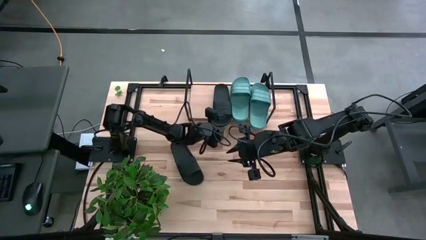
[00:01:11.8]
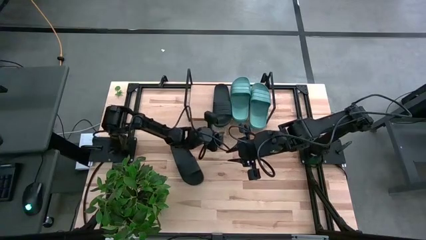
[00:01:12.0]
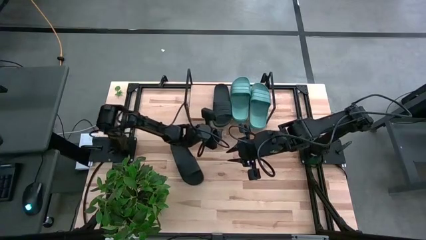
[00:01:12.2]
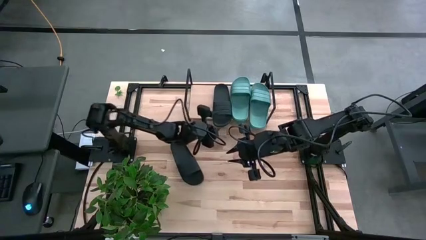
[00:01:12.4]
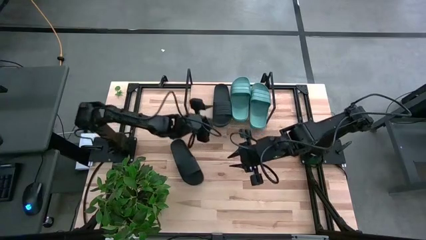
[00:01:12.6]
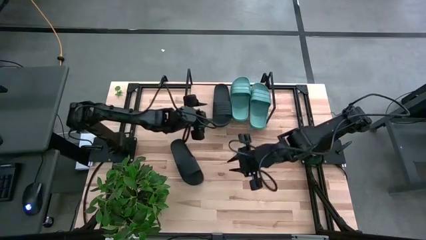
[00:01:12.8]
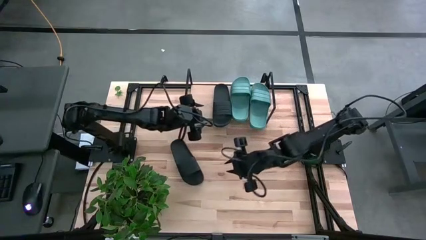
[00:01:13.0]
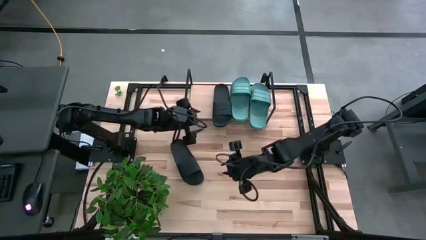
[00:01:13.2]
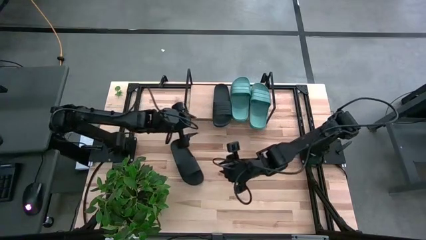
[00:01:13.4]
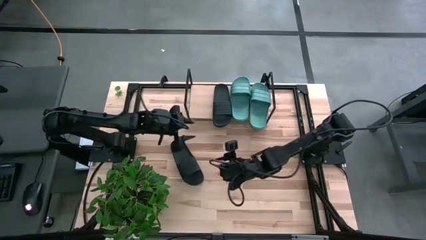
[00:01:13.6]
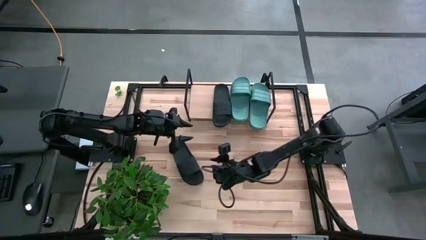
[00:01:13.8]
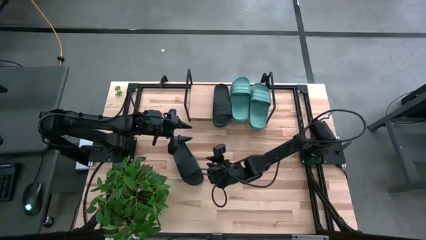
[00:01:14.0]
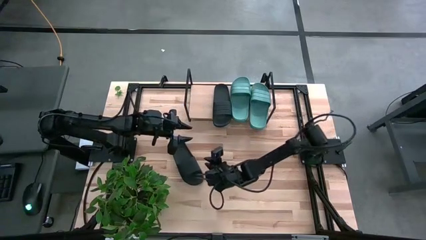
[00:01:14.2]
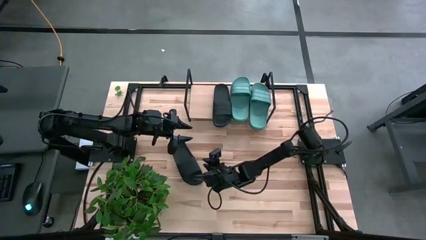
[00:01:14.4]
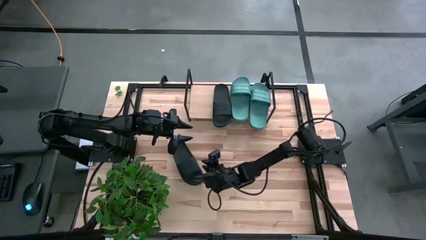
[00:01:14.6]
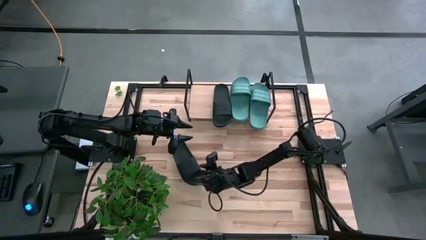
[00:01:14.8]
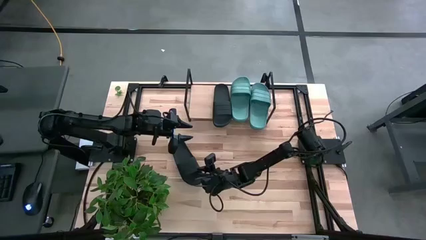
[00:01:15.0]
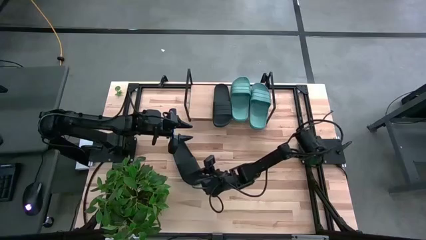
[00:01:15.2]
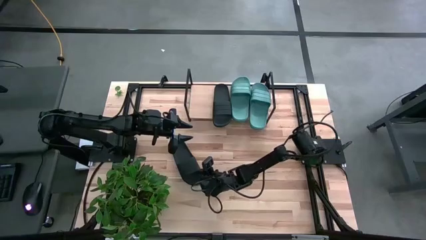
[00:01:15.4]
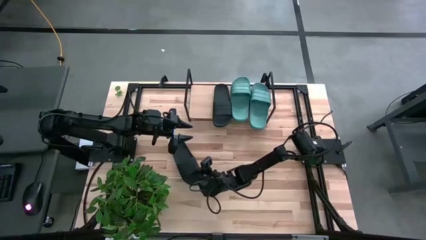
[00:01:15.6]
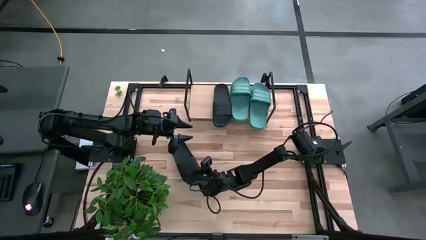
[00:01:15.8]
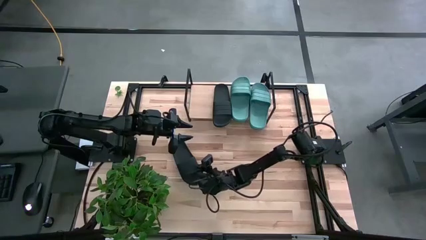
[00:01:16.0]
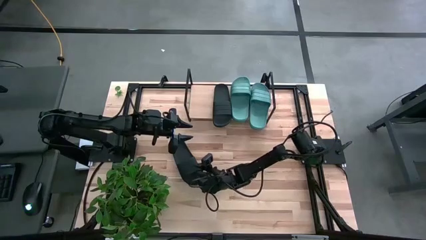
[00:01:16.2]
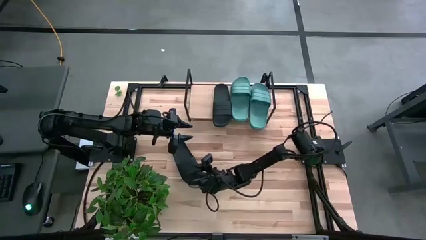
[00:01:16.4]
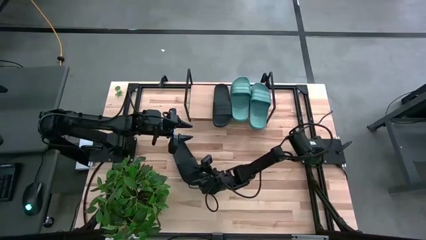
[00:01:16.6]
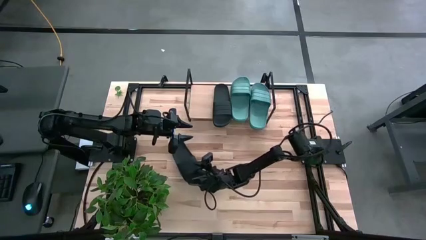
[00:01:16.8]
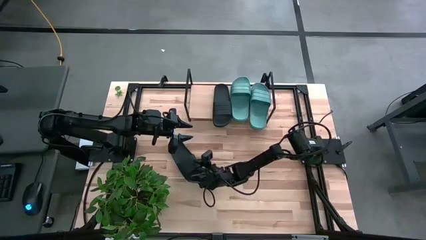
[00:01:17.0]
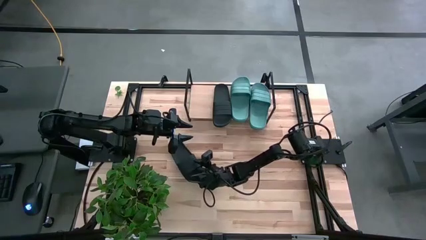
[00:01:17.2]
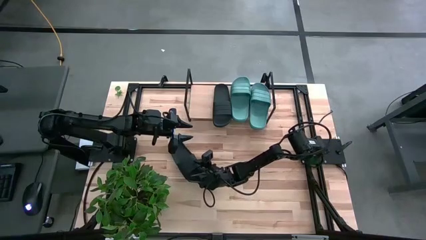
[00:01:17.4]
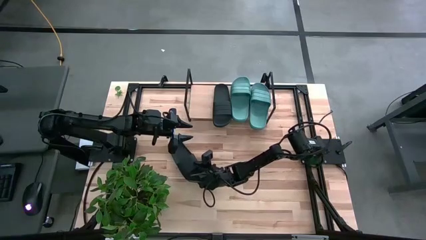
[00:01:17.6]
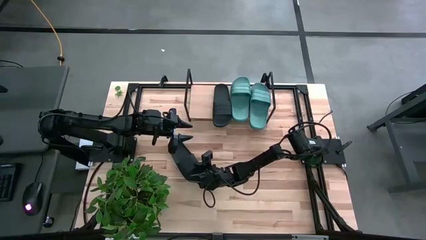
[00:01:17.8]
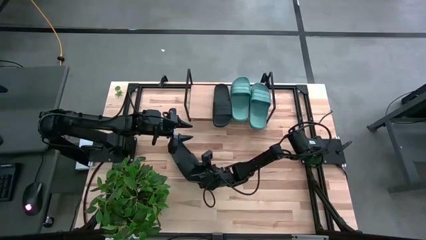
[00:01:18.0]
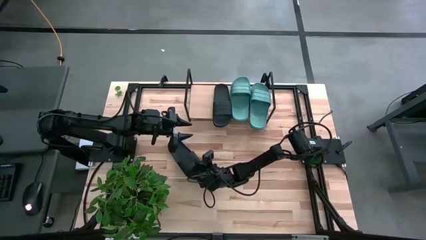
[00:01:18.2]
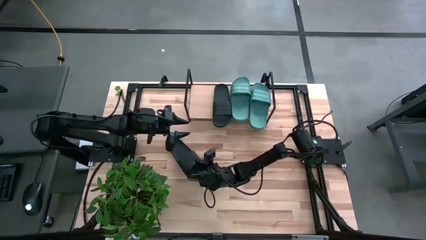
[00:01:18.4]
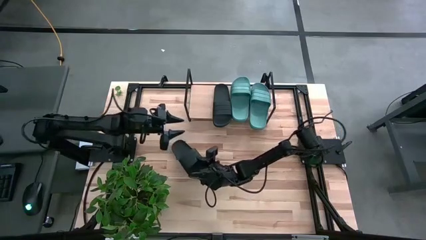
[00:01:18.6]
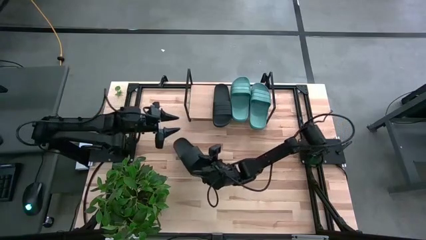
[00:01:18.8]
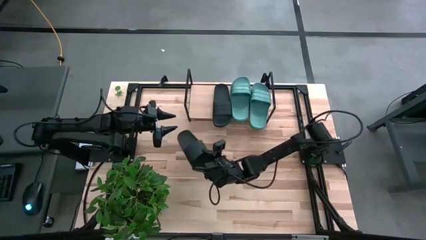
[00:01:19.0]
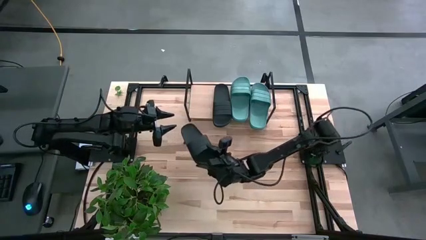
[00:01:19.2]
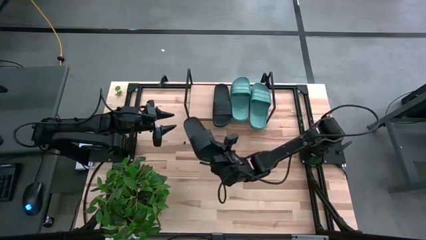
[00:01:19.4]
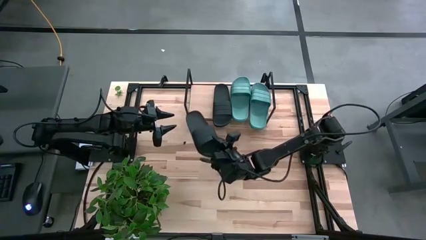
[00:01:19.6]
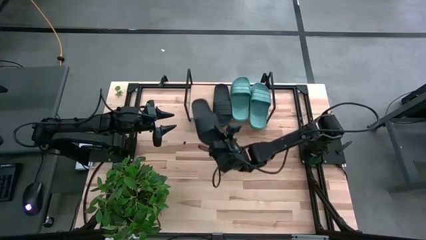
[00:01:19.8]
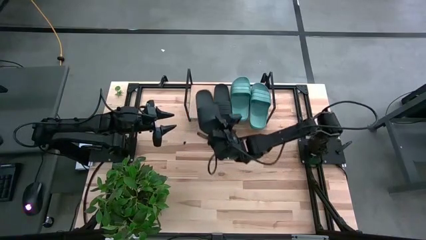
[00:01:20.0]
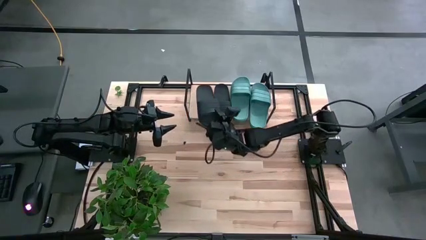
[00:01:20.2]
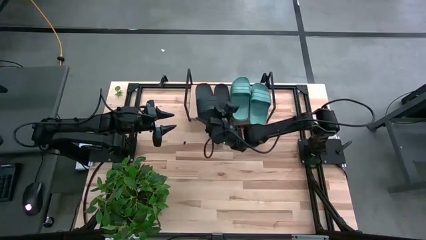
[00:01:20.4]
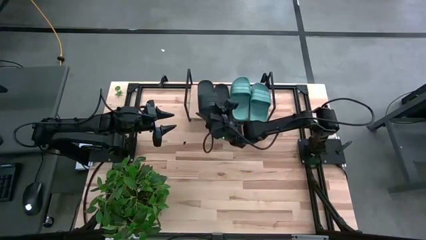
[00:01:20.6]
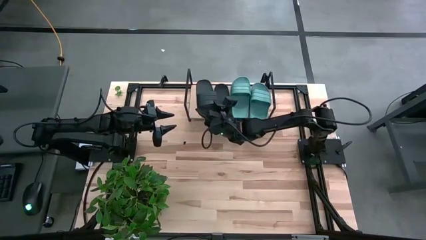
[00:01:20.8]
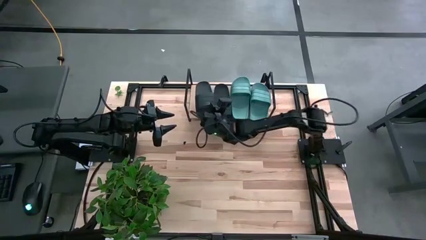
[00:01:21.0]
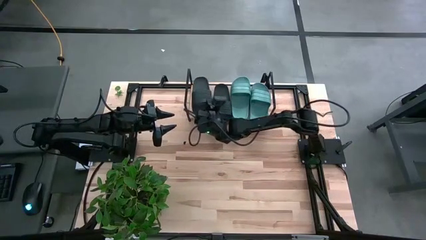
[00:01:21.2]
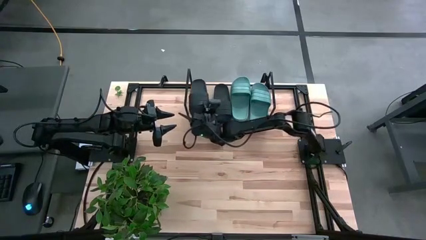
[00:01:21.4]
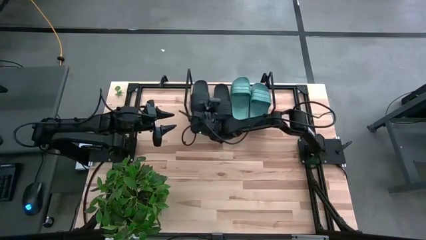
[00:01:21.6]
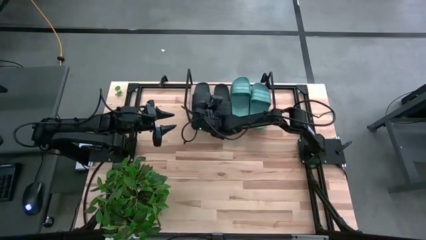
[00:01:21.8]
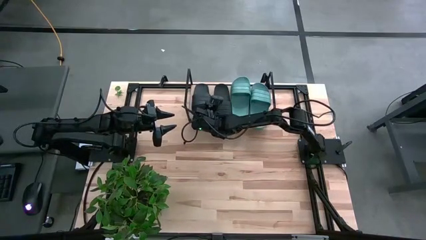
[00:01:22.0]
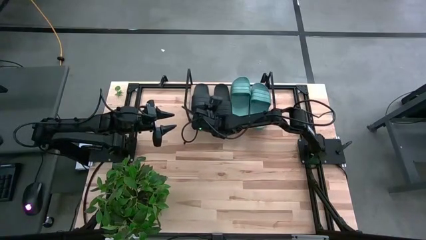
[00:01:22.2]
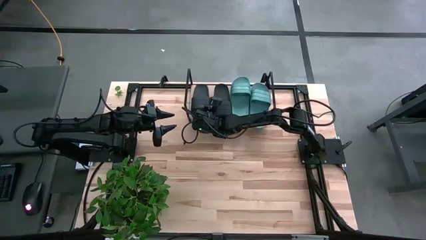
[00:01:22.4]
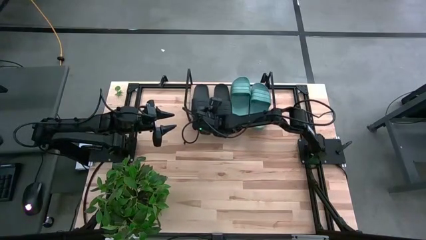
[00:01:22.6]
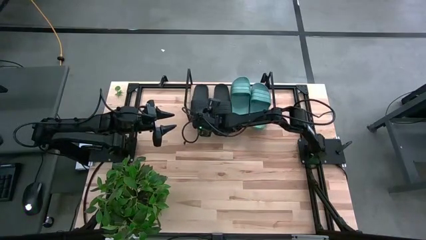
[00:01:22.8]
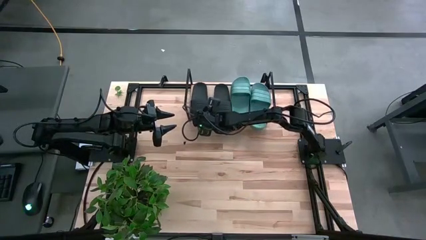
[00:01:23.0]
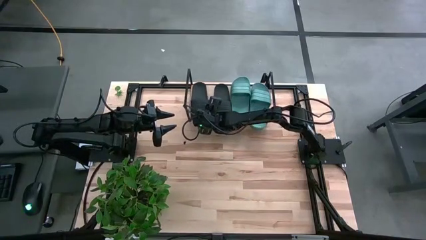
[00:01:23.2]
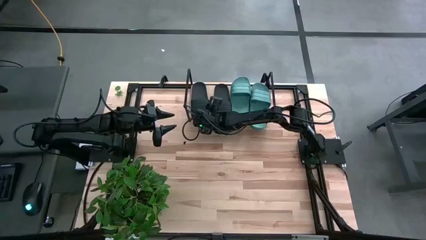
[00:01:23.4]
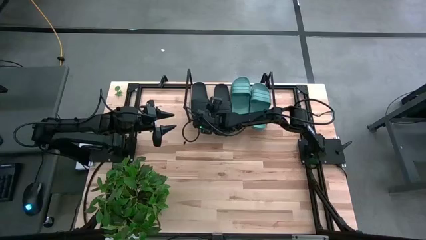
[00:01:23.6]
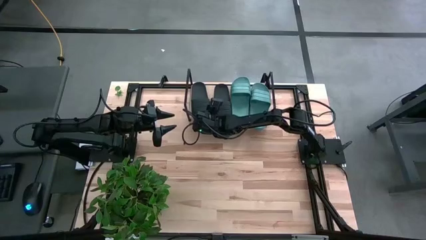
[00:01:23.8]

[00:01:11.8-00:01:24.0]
Task: Pick and place slides into the shelf
Put the black slides on the shelf

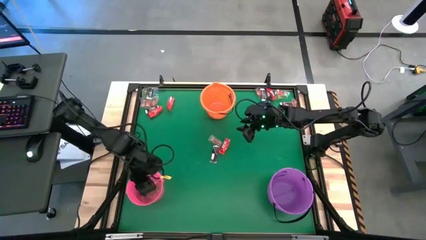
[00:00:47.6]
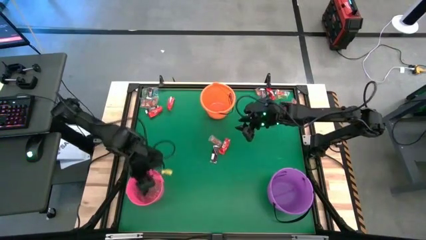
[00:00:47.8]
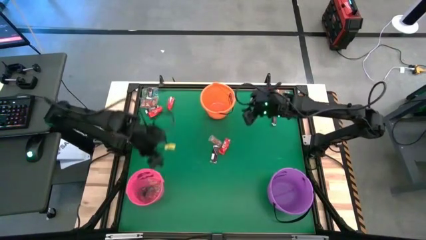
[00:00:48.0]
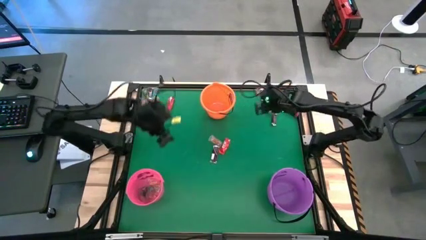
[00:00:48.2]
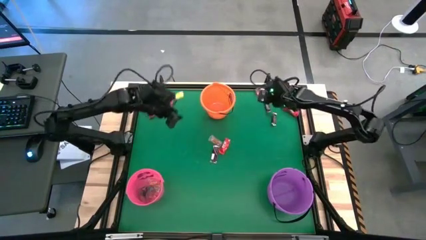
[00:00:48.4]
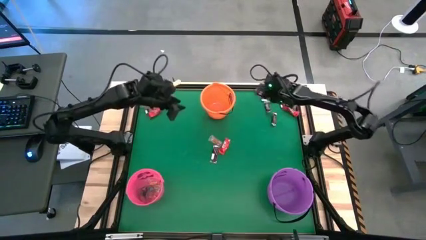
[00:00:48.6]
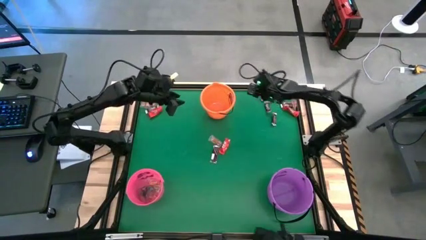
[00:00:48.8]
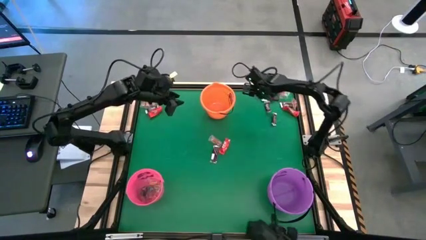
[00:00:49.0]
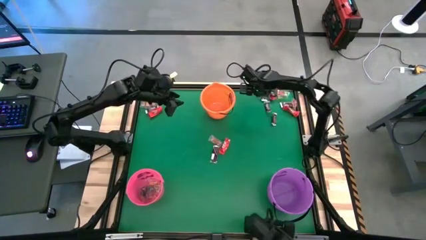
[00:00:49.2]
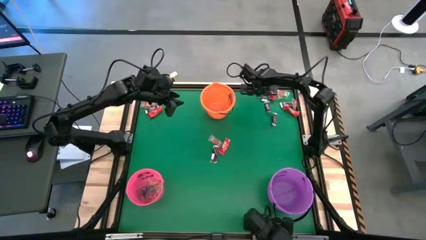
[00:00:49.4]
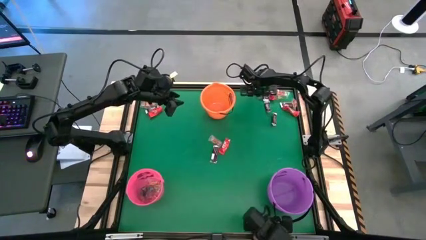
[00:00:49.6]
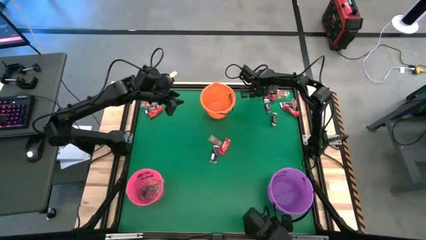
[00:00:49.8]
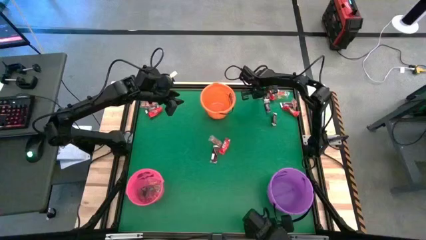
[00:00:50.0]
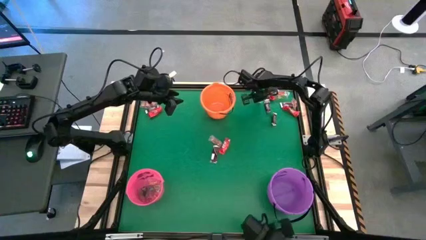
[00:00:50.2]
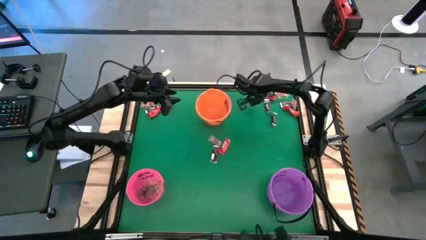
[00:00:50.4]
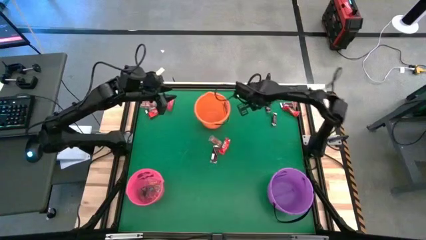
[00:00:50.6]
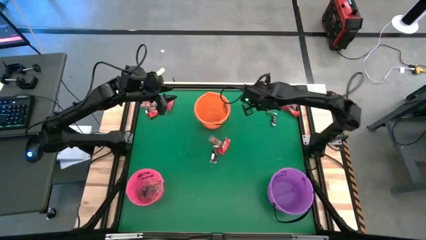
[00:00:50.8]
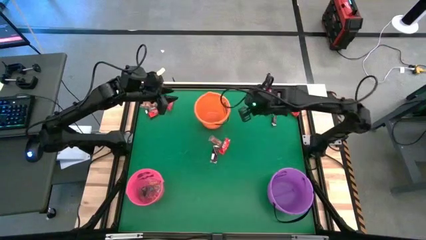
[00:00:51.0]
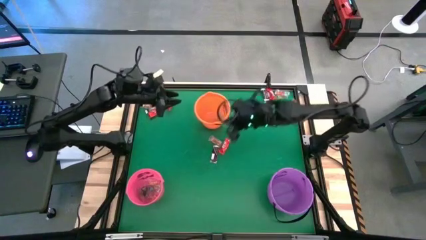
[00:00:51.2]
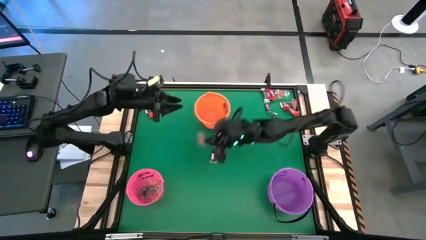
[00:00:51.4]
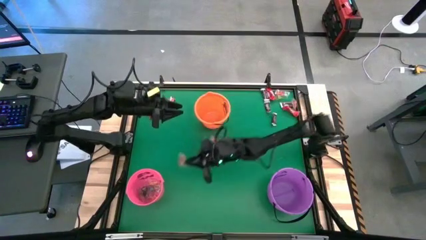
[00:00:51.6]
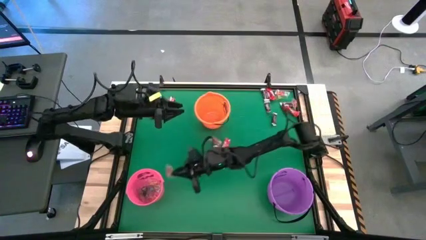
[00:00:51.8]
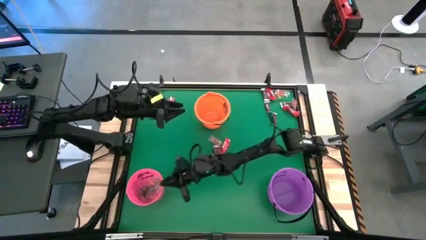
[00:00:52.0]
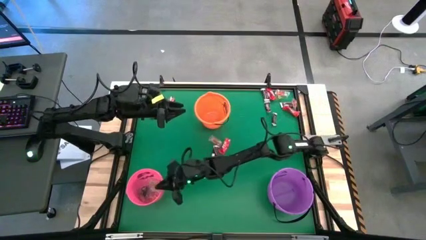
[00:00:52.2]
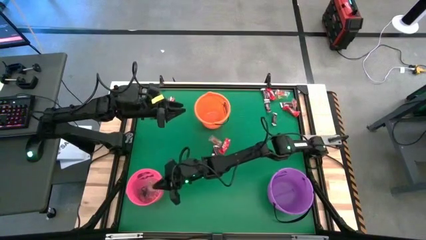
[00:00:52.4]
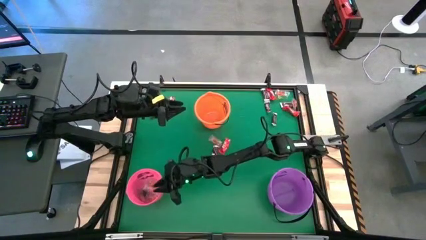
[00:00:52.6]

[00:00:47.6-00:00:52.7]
Task: Sort candy by brand, put in halloween buckets
Put the orange gummy into the pink bucket
